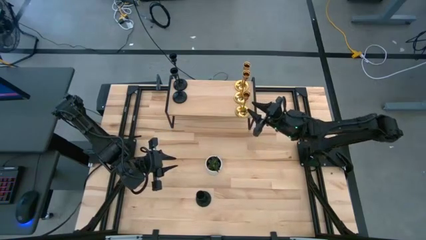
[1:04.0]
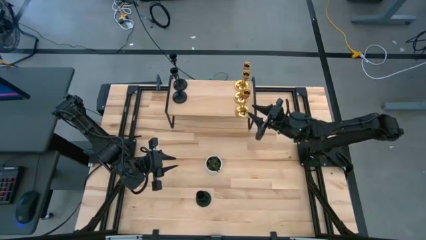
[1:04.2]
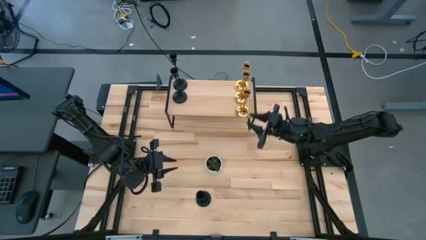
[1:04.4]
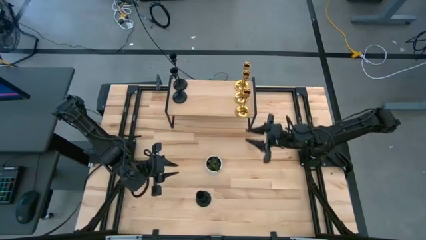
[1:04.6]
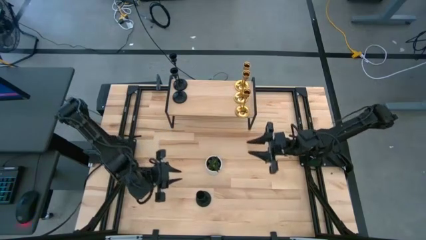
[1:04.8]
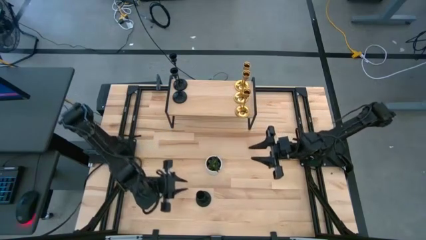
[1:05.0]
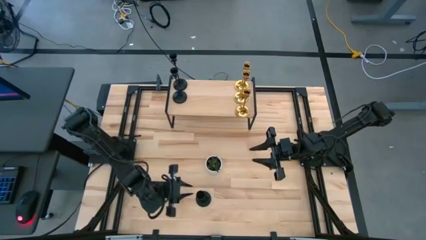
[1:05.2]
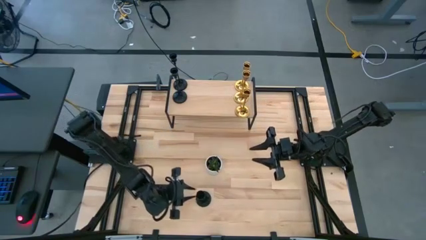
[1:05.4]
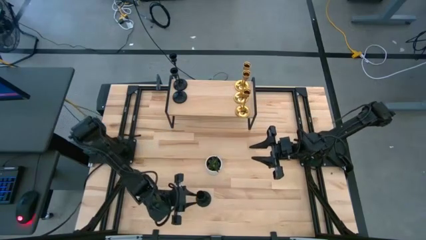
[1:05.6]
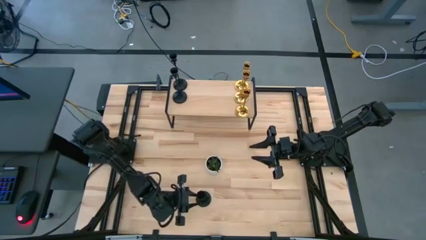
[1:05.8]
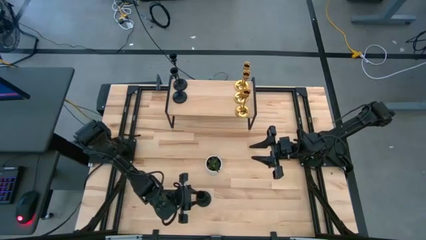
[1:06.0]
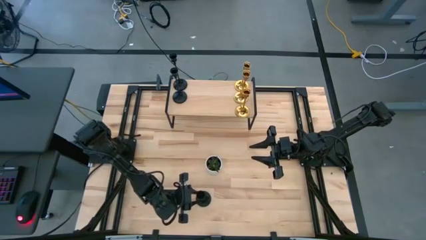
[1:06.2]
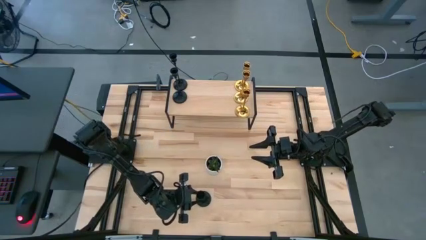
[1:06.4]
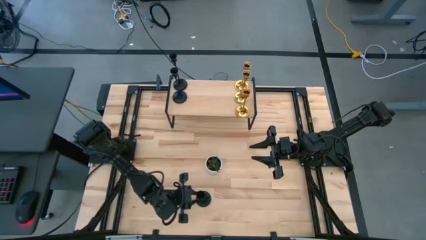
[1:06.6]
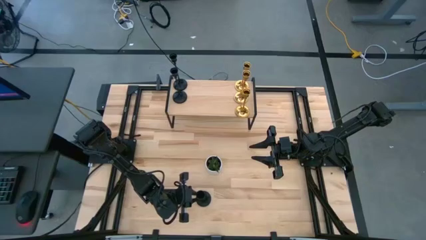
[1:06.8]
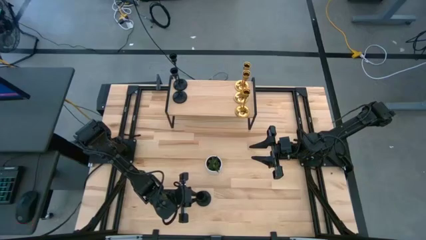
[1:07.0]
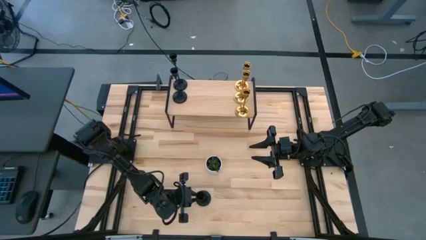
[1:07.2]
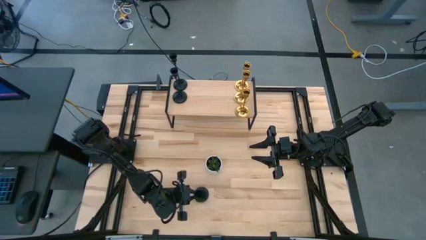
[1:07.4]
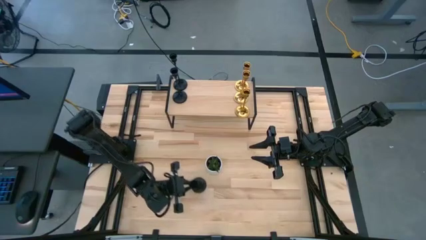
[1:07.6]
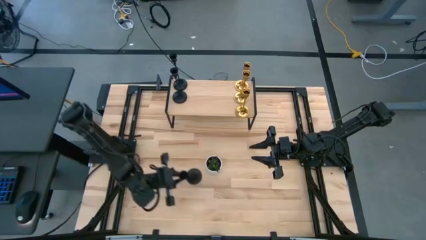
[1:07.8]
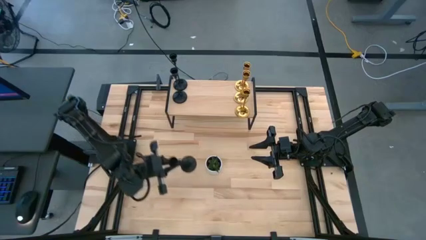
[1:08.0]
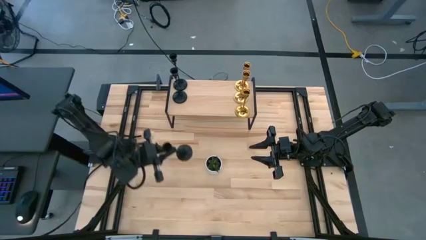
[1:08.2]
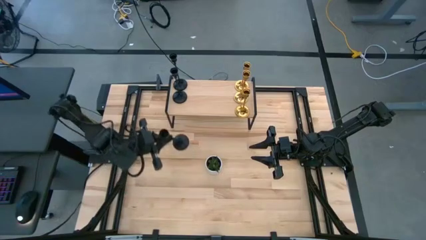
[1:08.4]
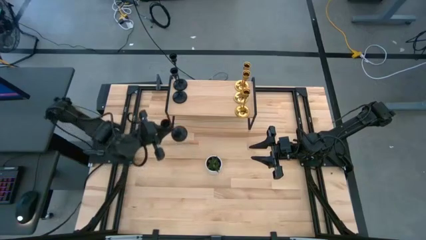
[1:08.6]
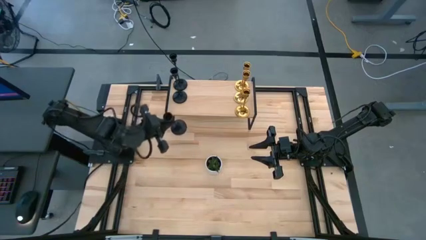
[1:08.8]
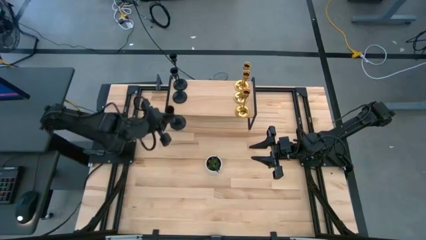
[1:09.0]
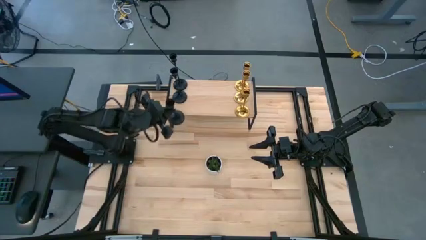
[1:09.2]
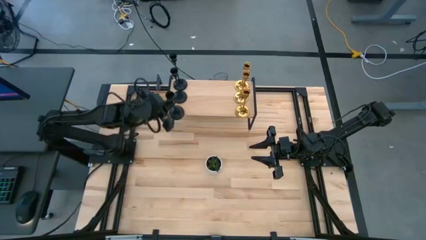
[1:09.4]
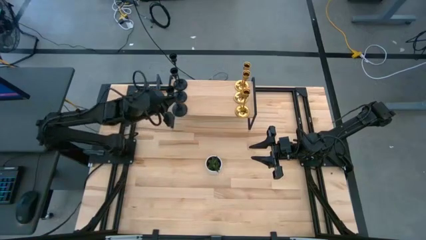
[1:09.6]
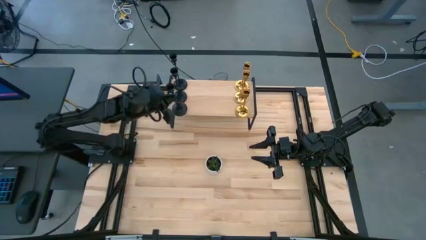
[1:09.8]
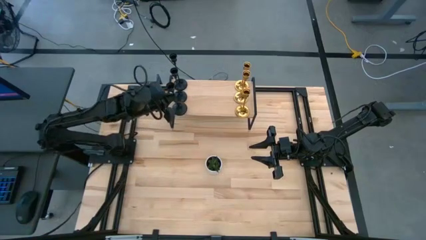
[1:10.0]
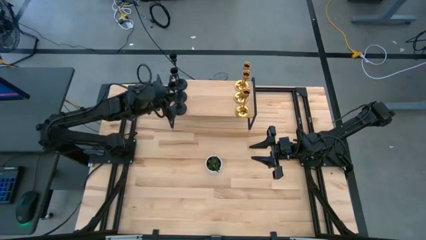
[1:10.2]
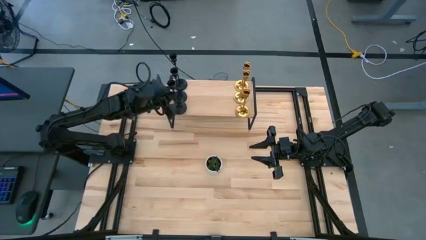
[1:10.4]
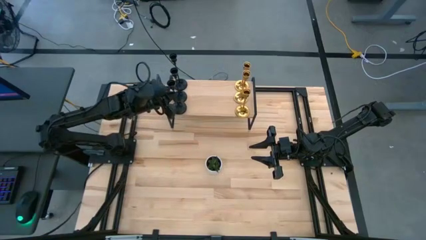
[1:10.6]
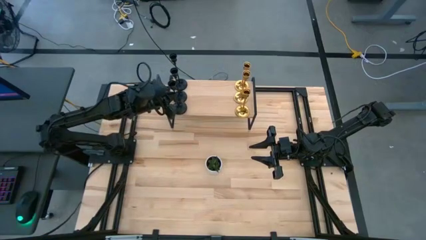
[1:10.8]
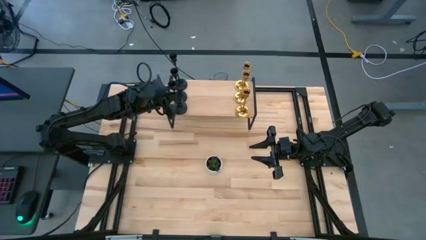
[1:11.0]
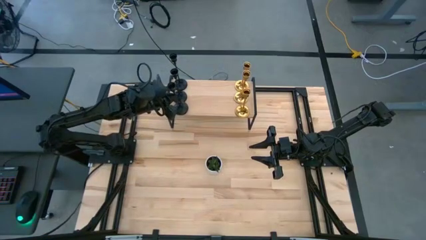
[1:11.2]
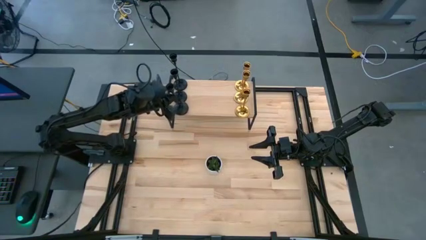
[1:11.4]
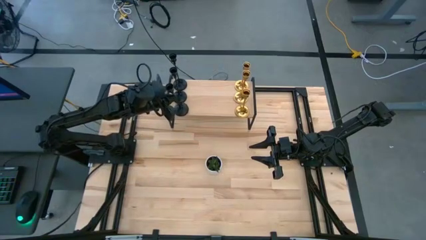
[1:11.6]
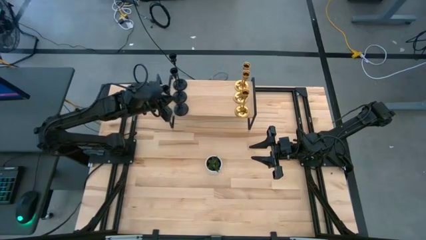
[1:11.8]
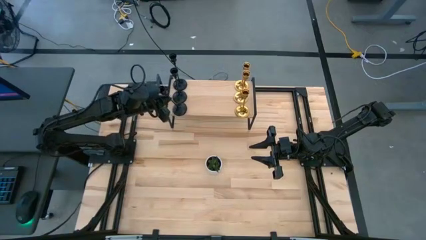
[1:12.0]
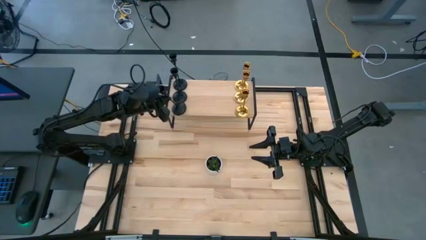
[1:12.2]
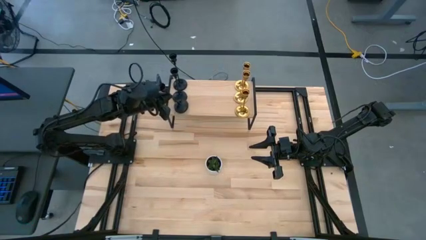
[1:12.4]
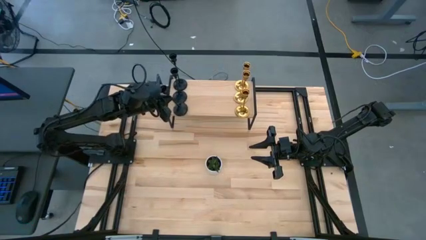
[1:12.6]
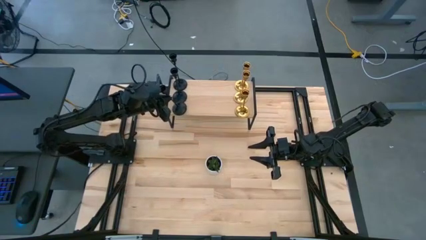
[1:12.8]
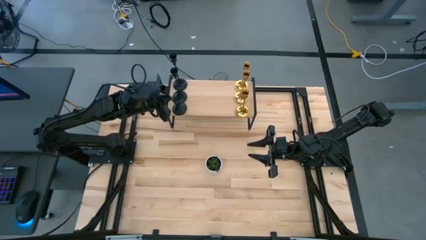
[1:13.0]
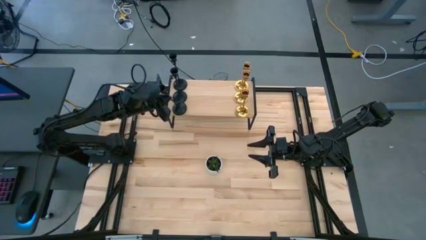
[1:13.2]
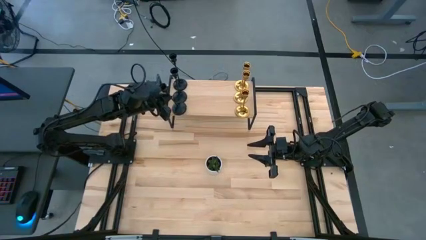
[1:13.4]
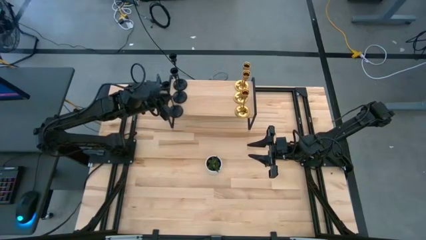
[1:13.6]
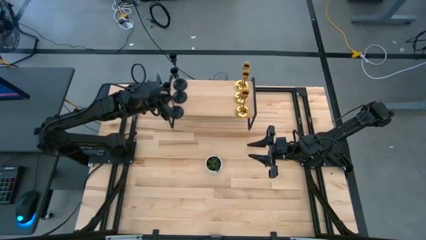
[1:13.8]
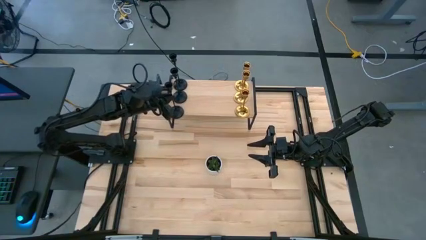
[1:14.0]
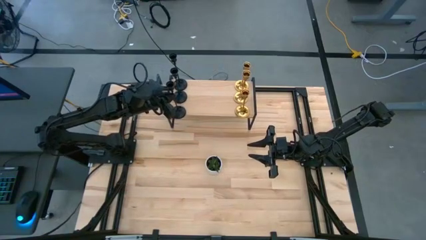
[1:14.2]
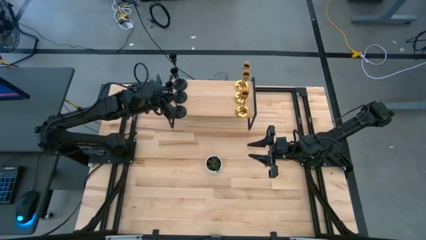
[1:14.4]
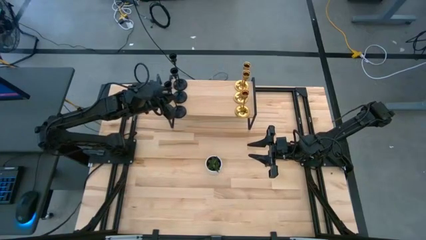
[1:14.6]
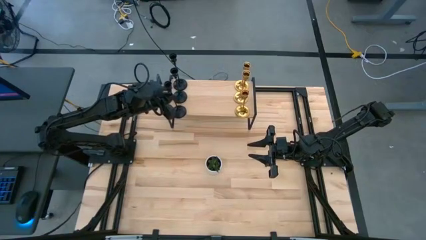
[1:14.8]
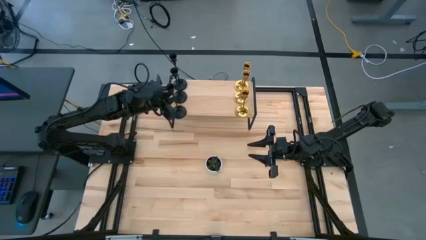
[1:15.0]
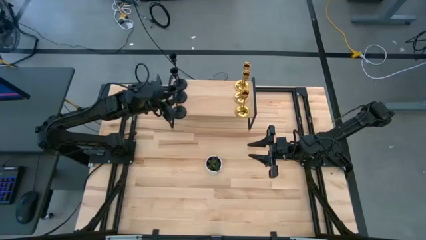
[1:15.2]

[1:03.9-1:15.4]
Task: Pick & Place candle stick holders
Put the black candle holder on the shelf aligned with the other black candle holder
